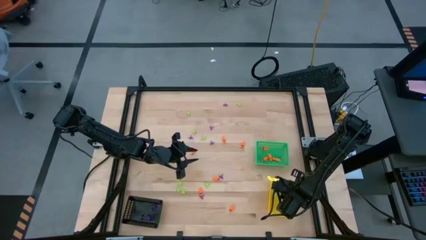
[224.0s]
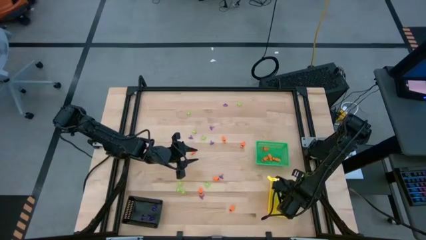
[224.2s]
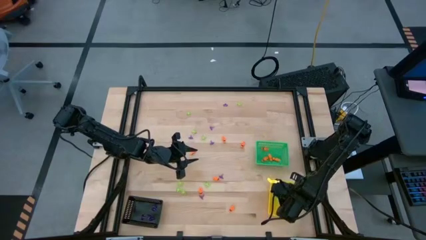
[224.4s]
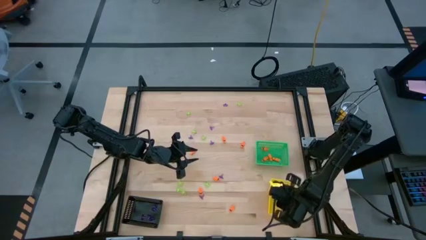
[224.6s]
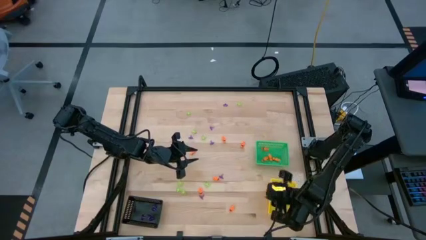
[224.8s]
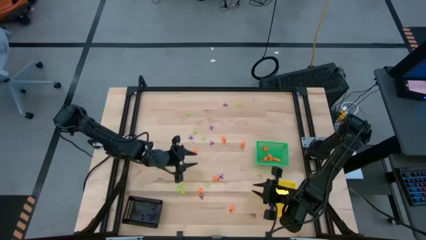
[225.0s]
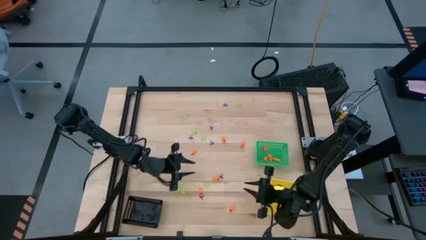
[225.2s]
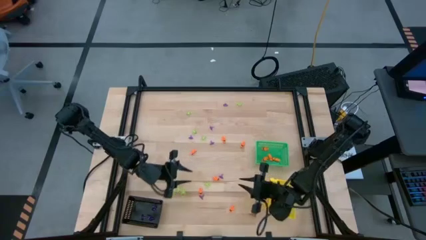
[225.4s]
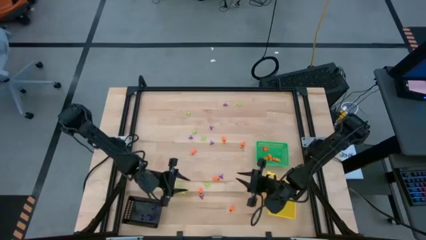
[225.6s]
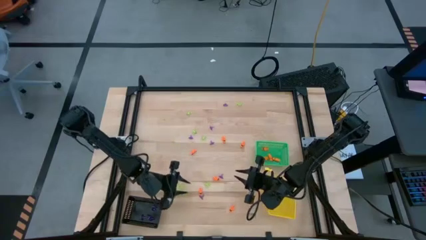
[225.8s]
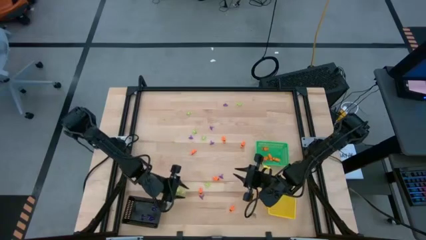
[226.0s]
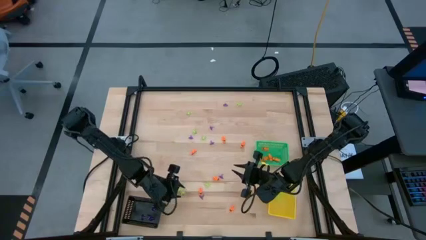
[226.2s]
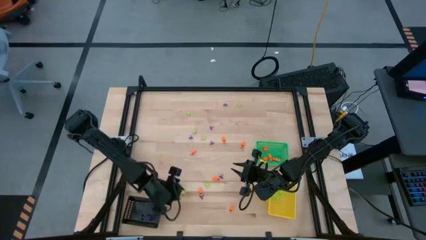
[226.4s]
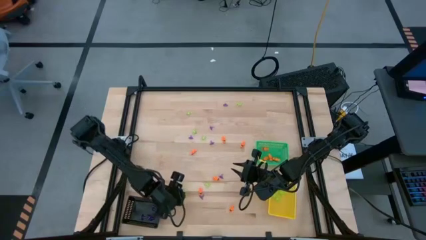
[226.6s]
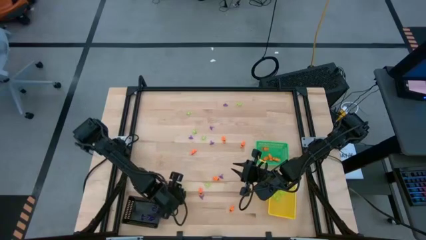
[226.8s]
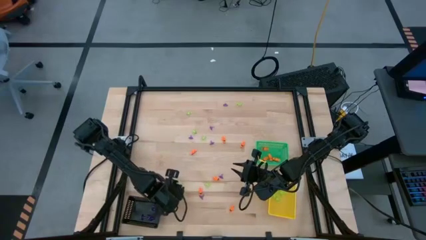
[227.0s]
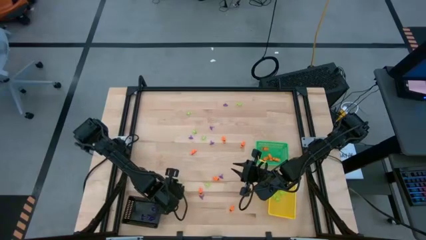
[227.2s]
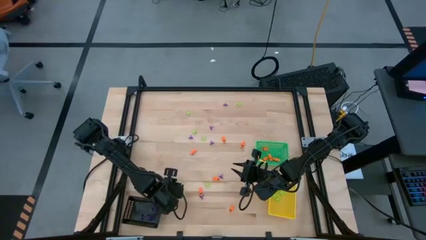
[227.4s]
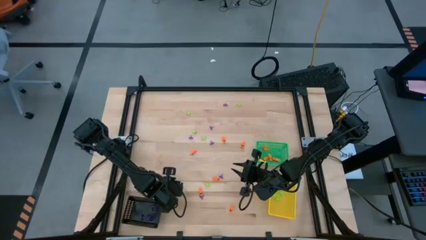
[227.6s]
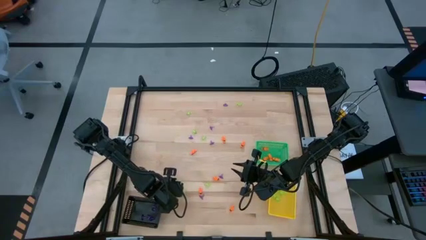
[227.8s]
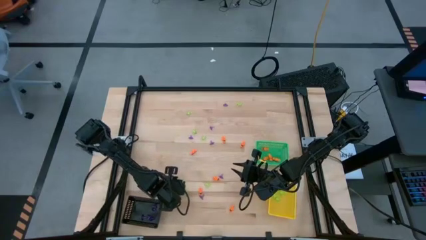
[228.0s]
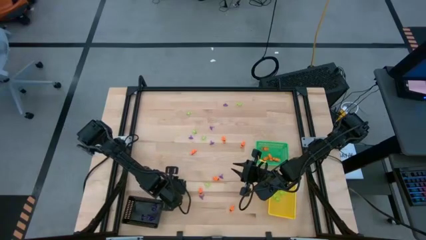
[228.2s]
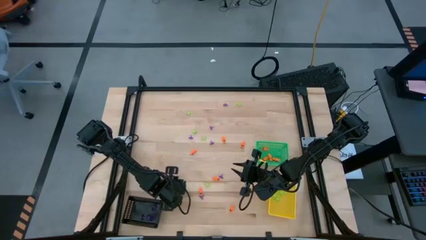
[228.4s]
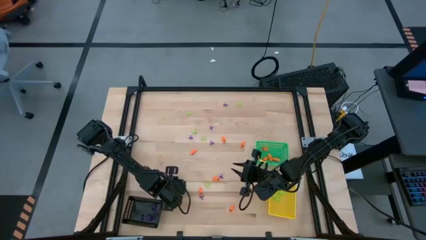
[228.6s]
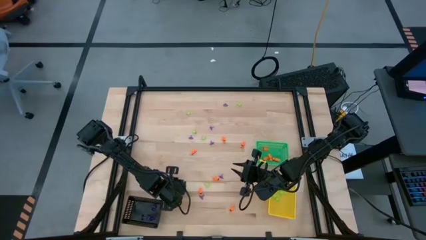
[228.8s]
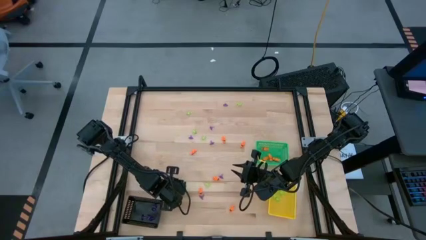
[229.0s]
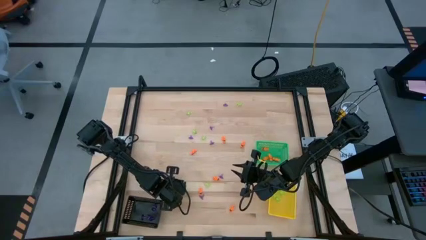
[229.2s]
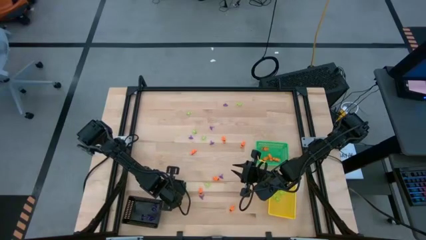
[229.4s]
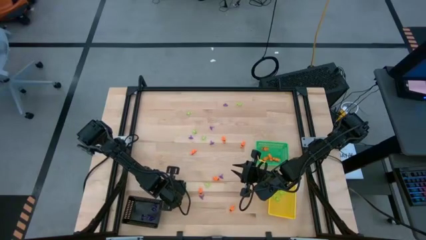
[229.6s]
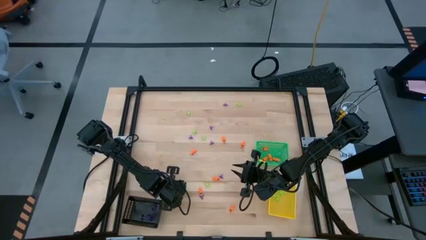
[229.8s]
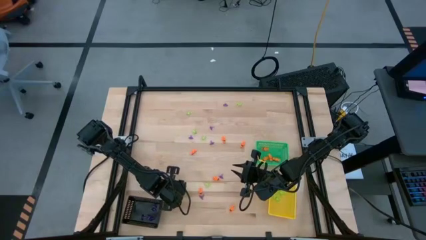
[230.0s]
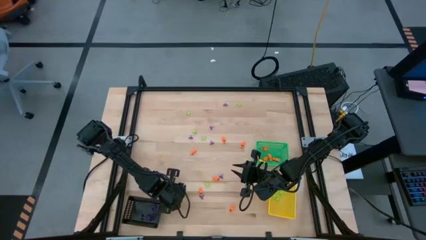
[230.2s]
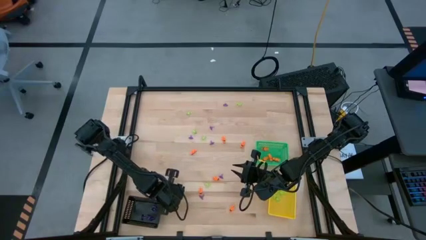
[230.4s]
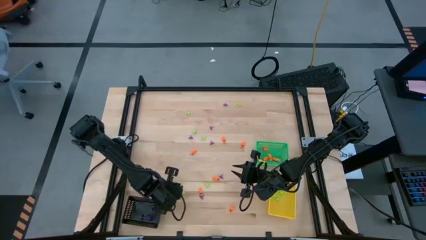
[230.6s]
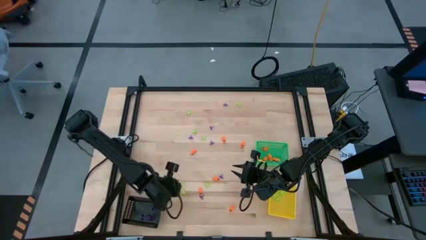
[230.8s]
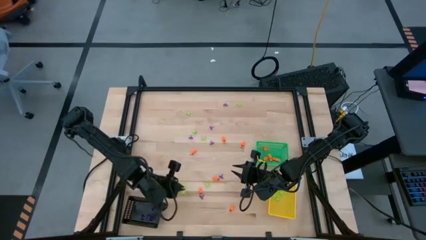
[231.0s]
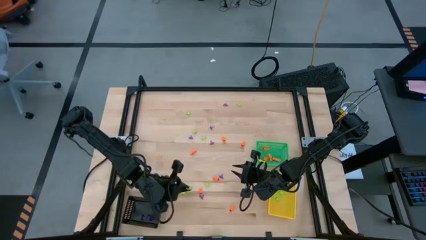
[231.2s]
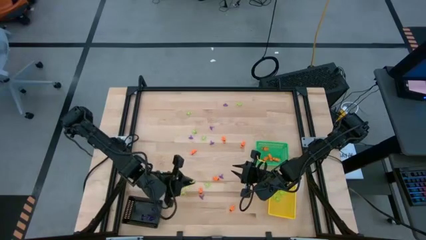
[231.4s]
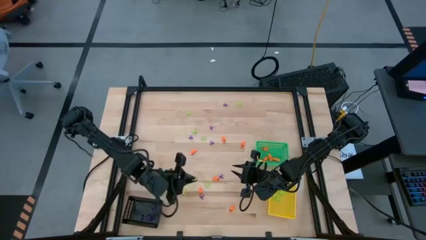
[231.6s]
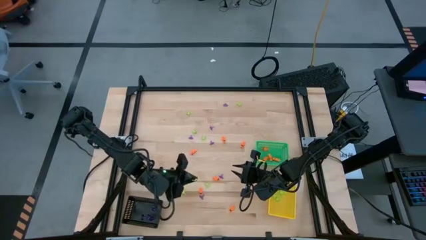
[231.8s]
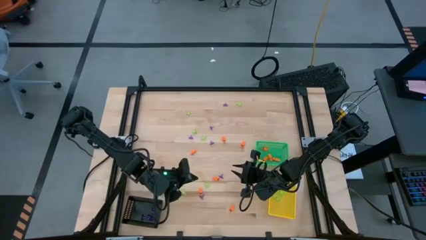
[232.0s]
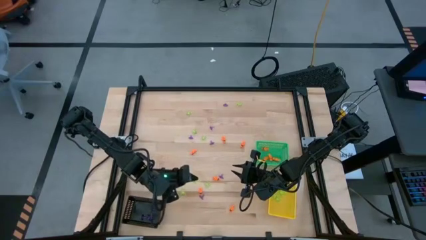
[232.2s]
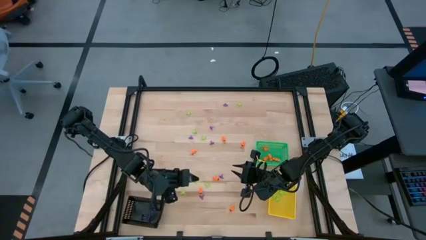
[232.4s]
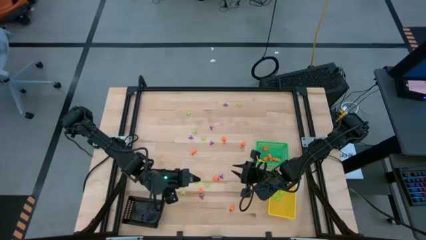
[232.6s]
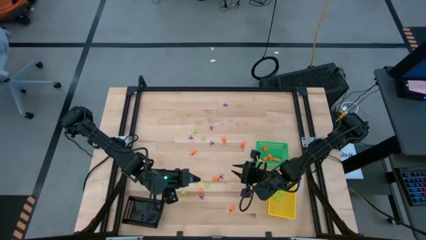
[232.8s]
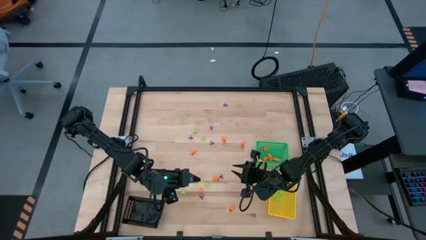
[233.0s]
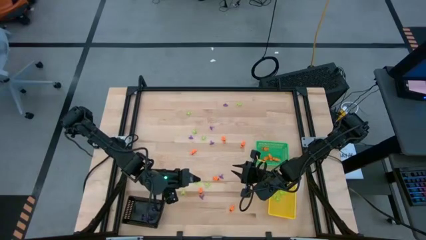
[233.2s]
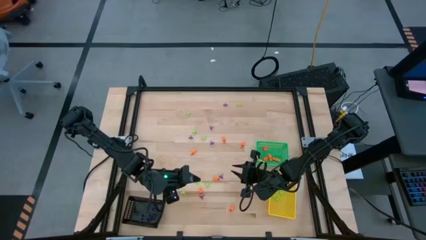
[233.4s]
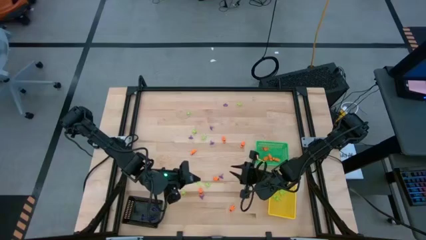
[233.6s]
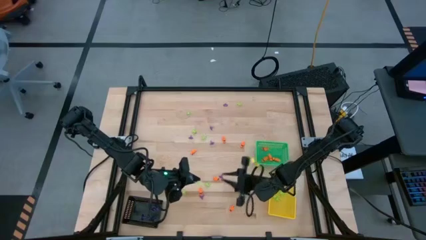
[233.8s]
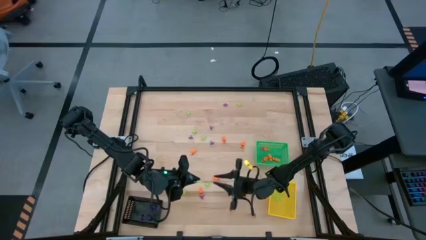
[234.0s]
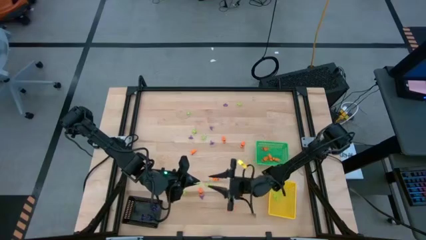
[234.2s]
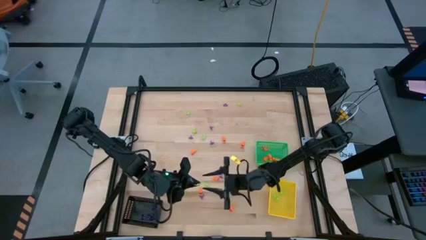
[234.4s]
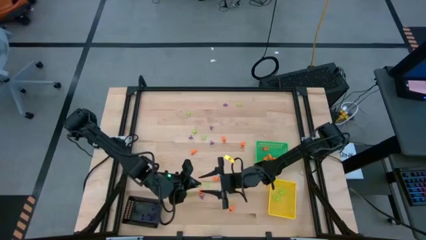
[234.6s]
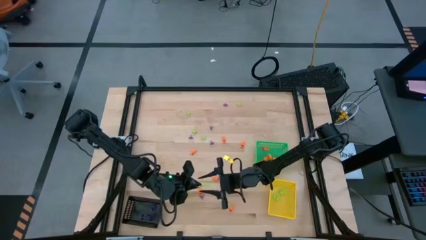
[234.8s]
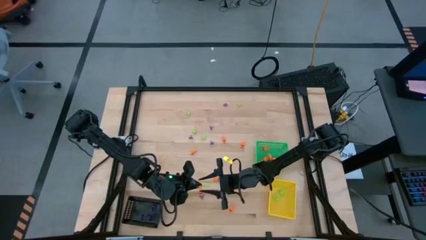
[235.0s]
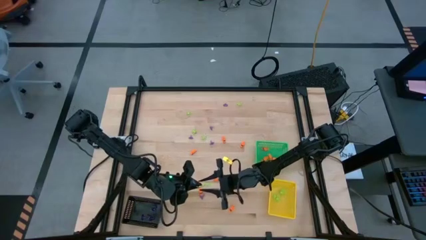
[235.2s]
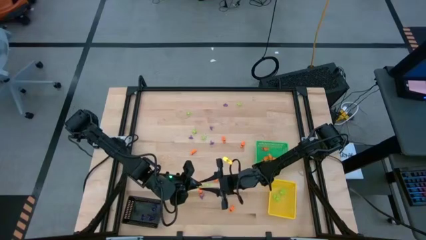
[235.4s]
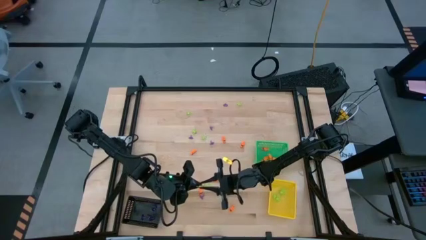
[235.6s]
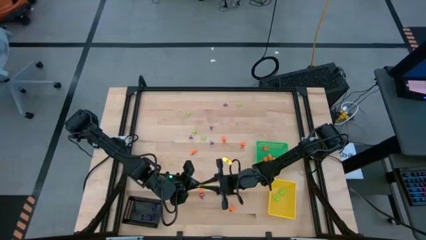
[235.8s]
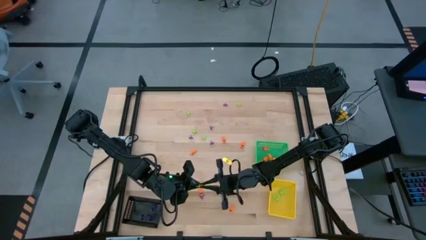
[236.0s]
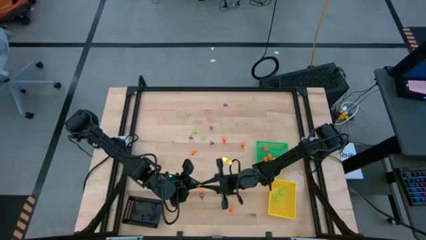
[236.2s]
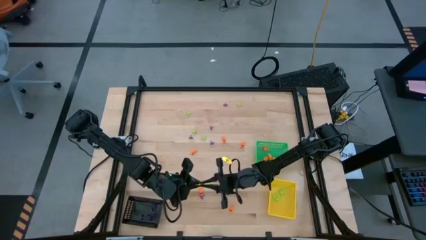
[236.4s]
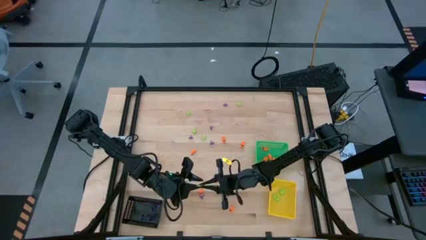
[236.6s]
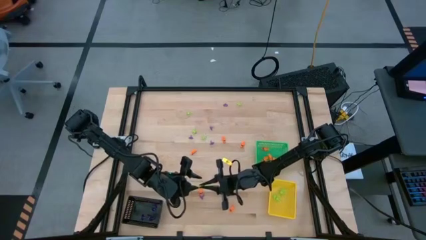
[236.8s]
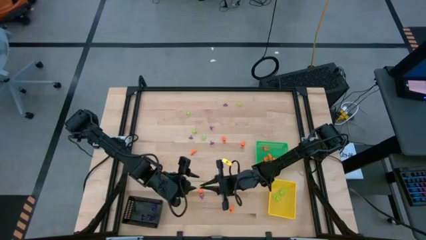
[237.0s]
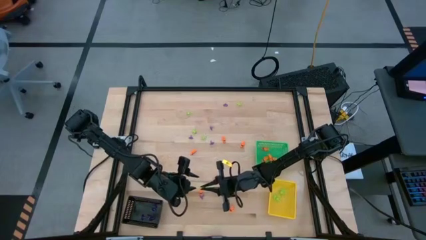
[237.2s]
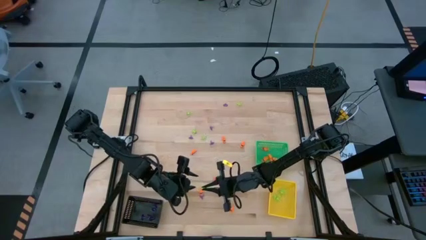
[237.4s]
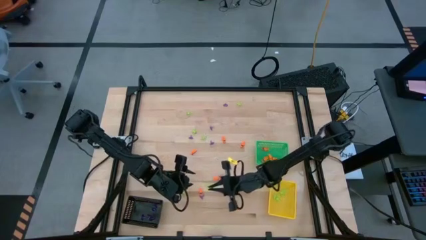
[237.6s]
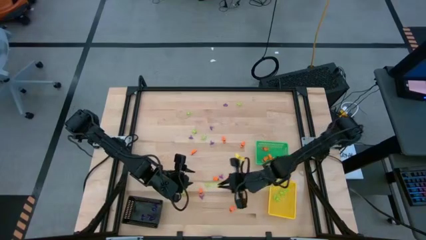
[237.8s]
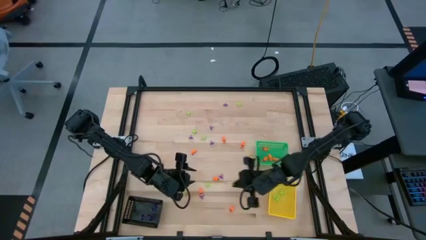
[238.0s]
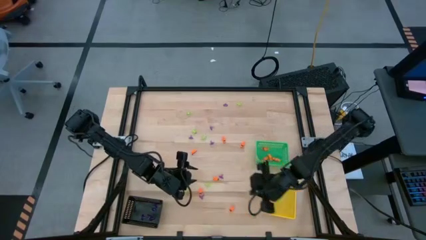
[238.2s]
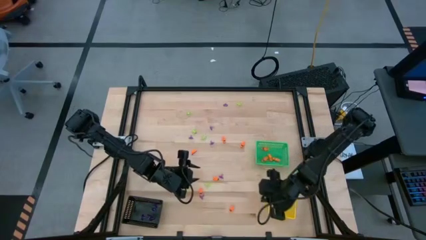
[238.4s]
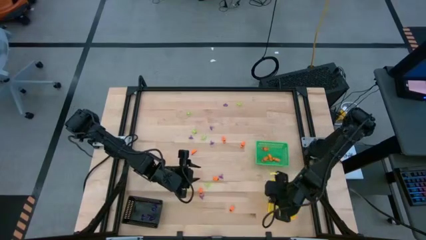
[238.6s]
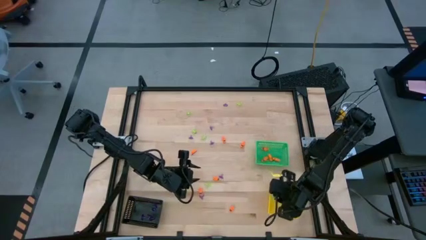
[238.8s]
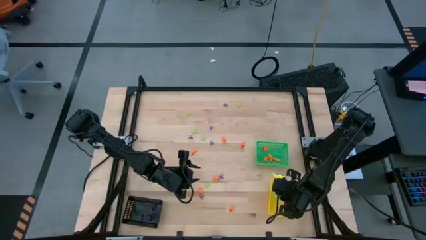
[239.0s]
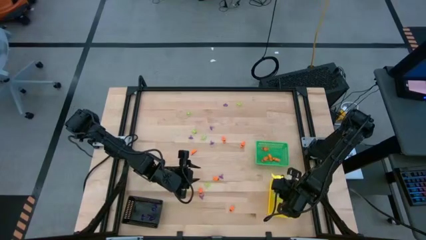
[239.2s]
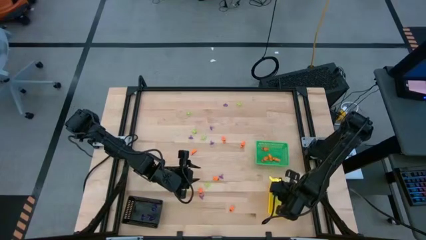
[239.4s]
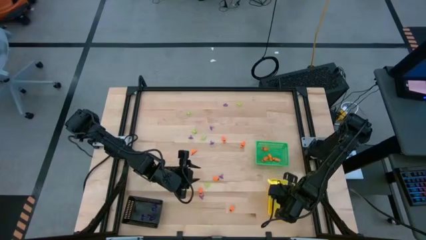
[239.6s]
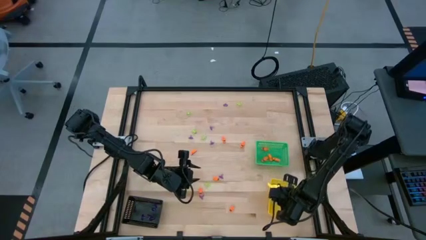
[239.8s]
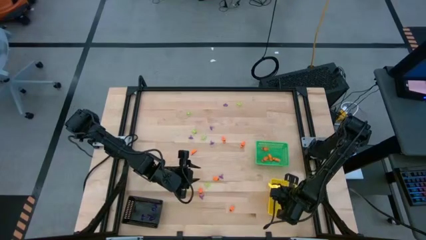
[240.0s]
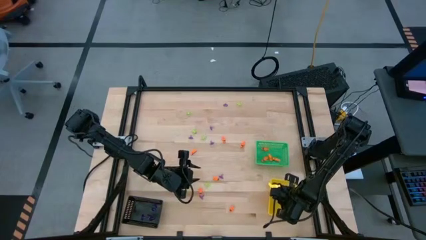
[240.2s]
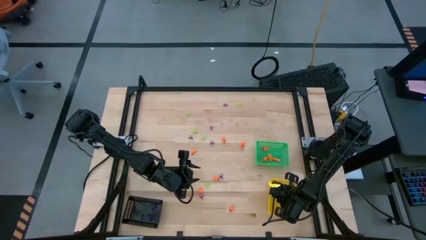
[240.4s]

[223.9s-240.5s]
Task: Sort Halloween decoration
Put the green spider toy into the yellow bin
